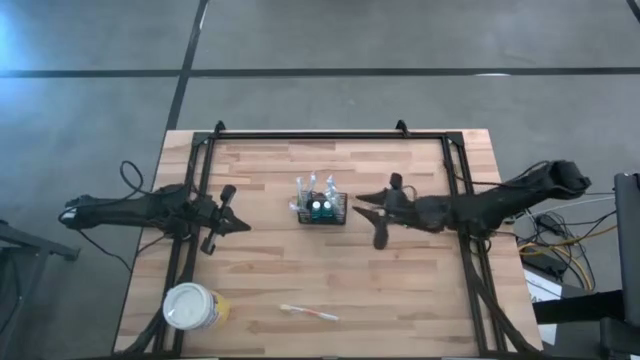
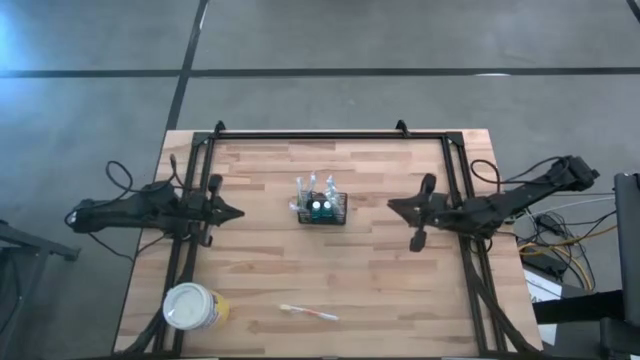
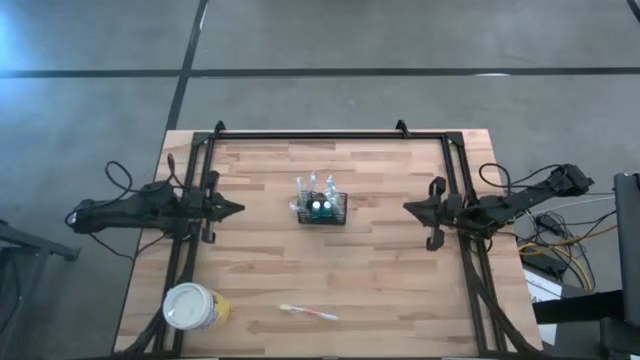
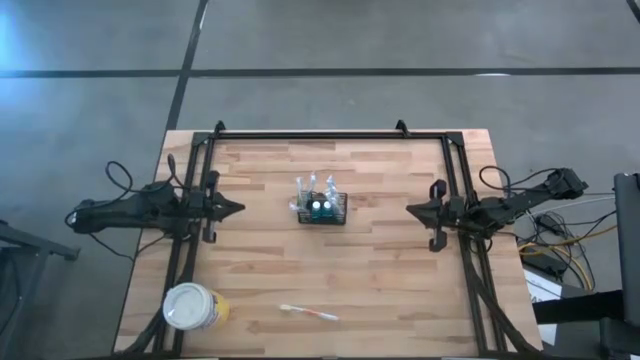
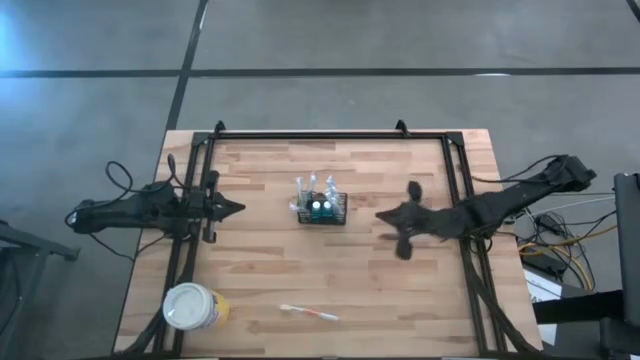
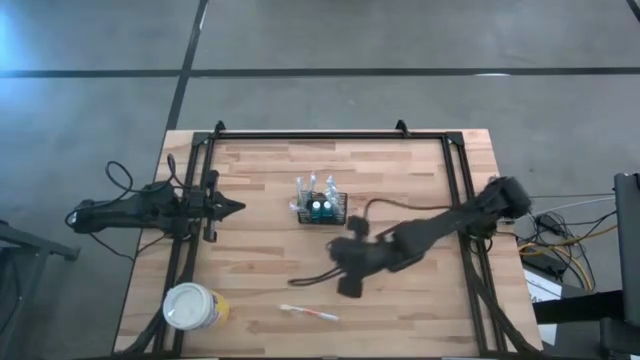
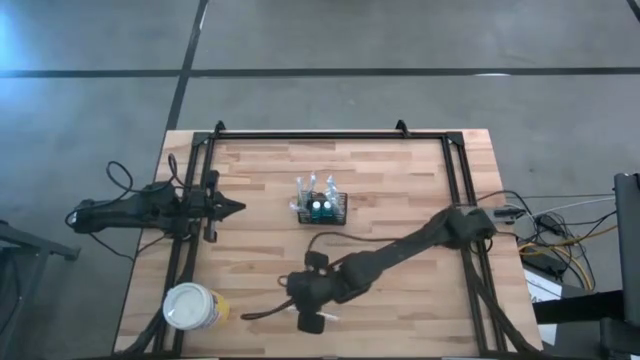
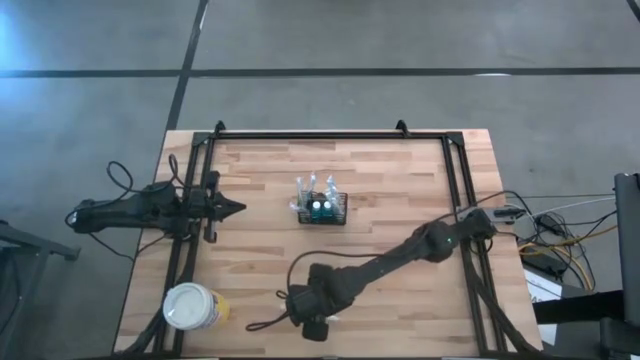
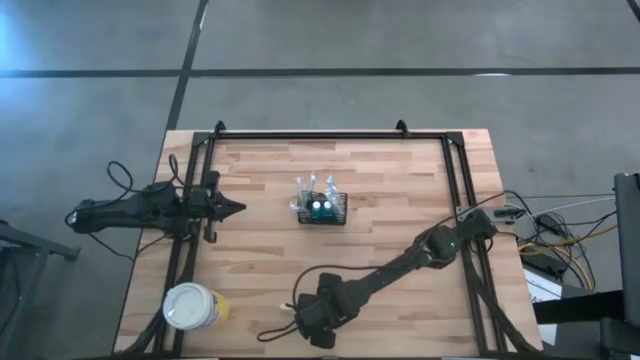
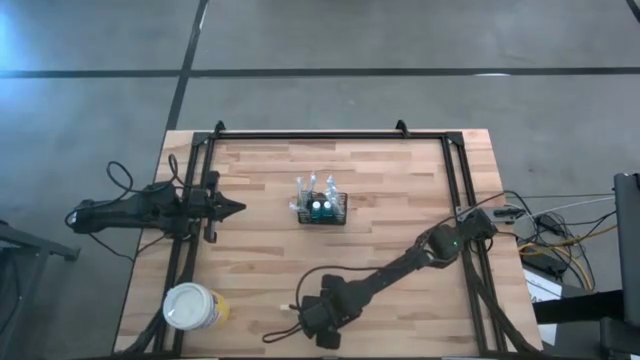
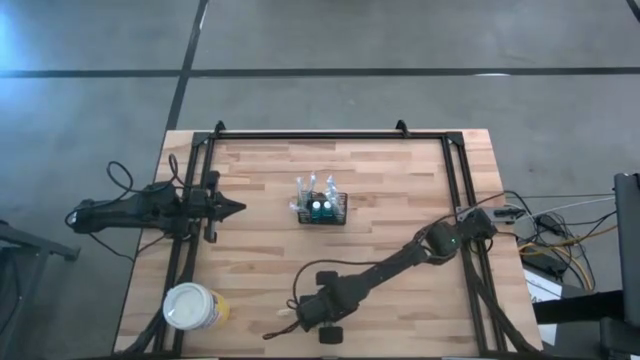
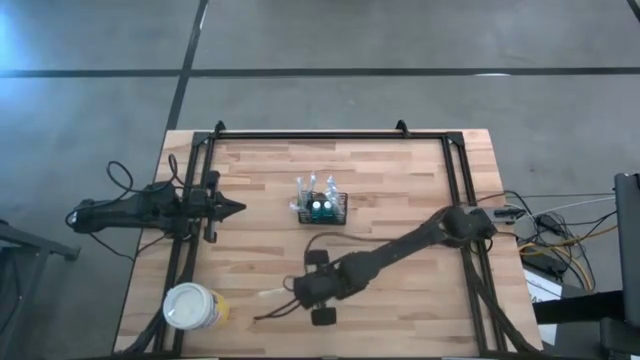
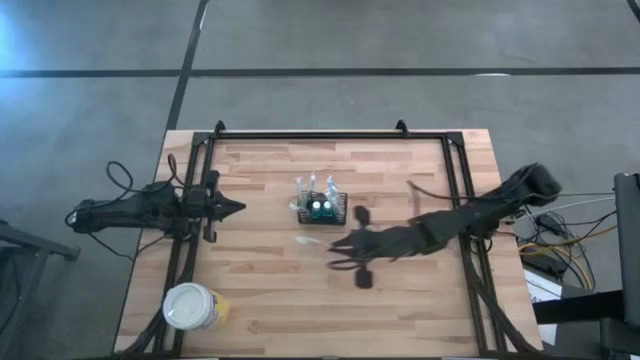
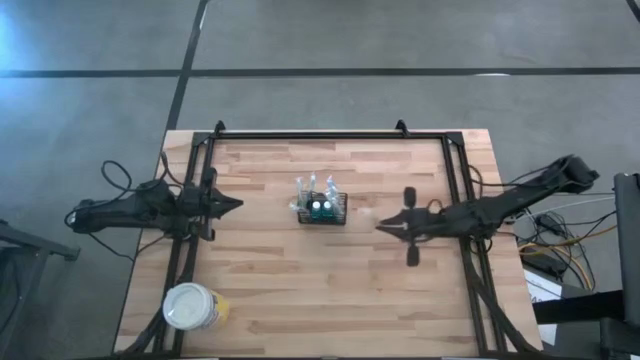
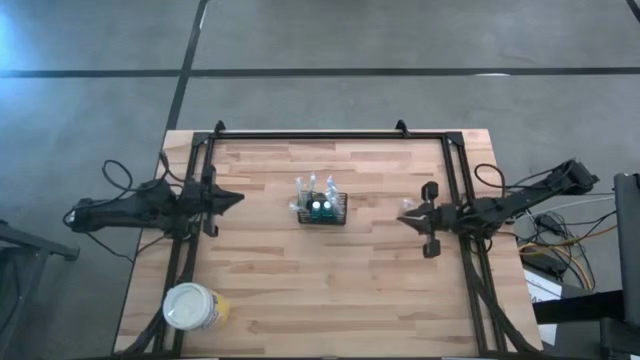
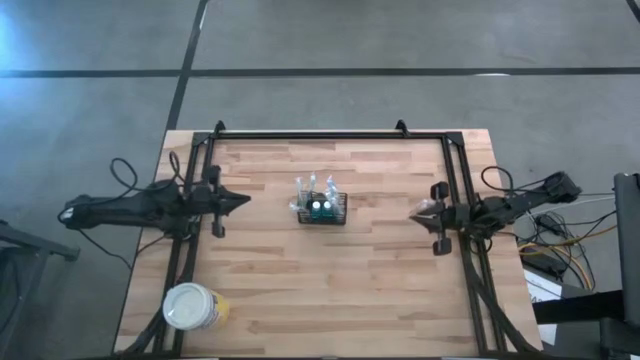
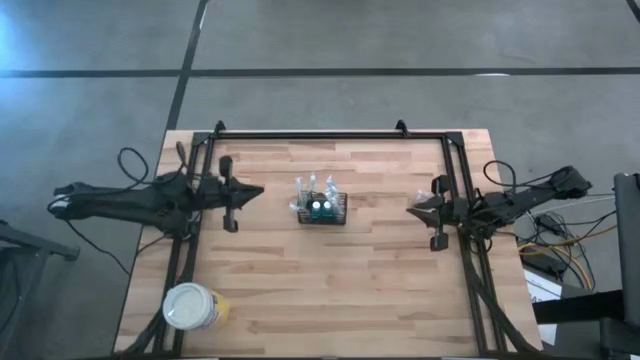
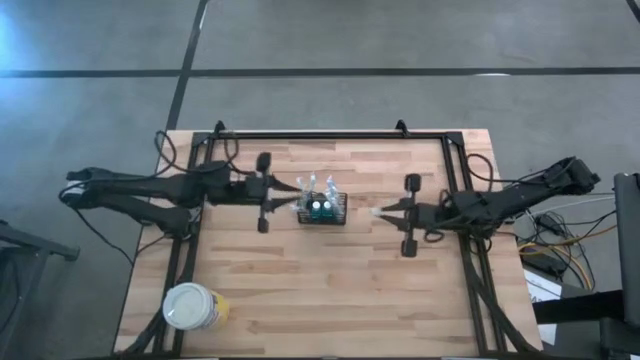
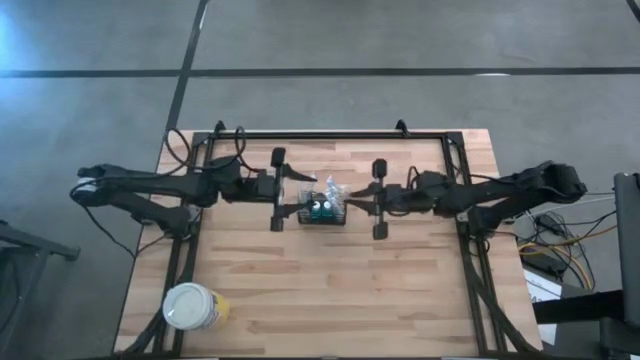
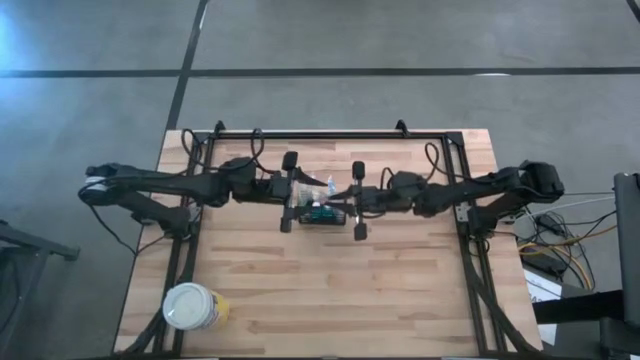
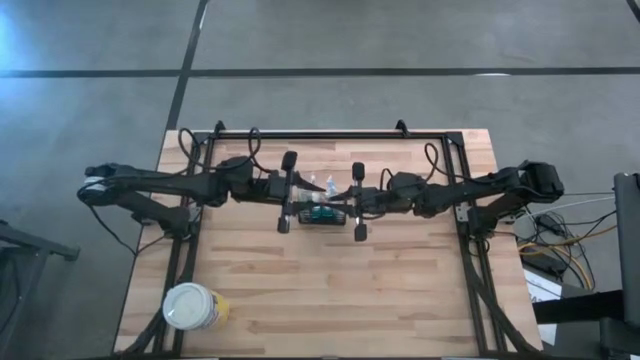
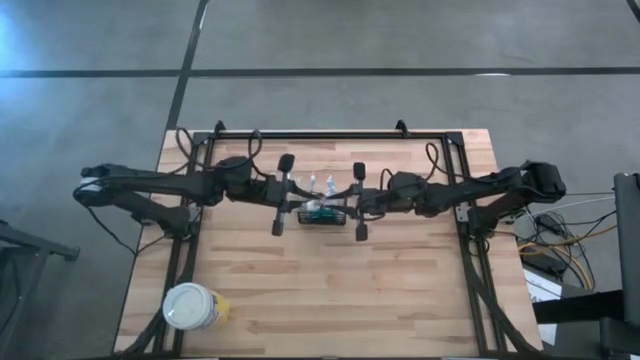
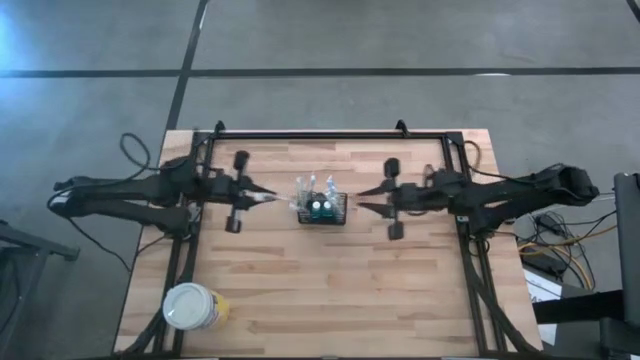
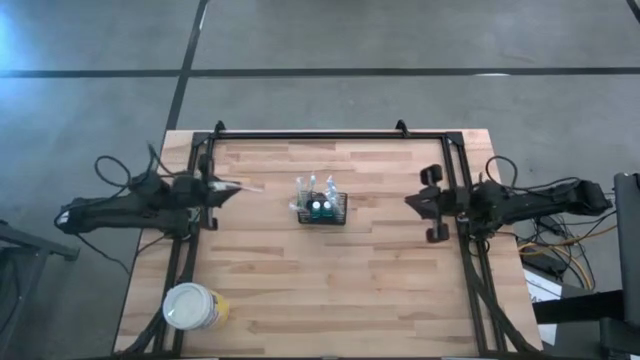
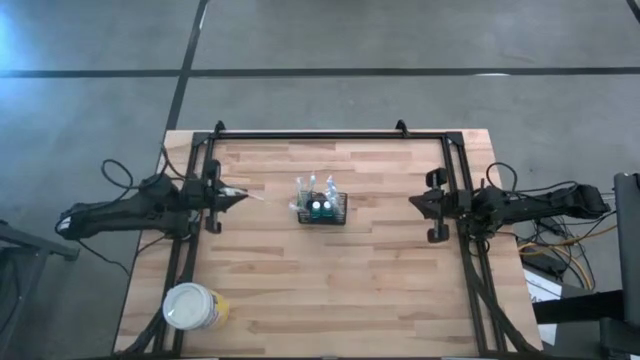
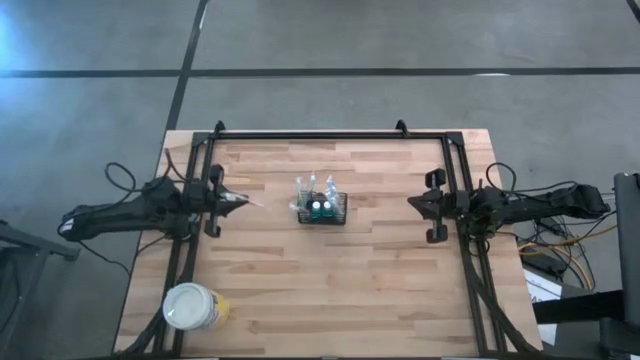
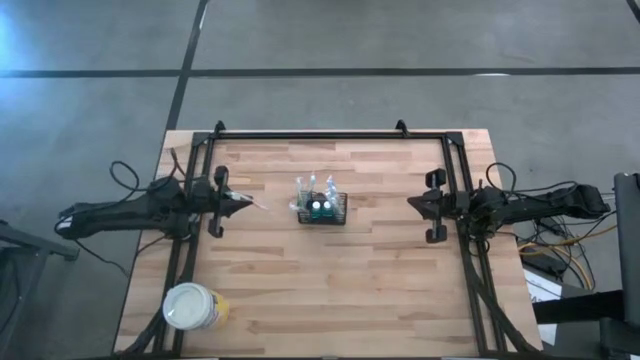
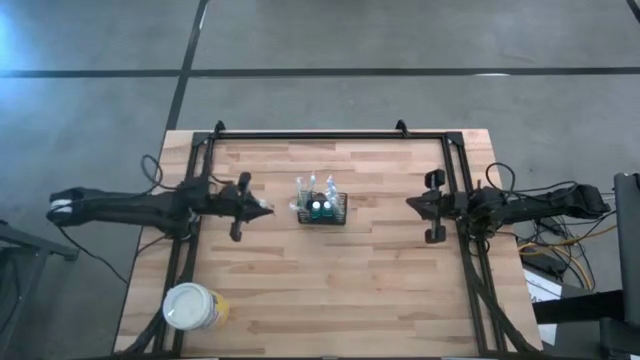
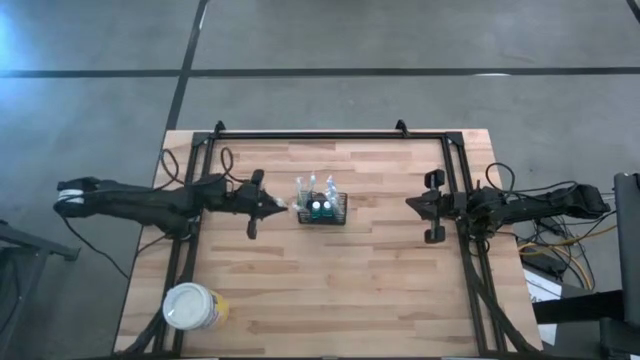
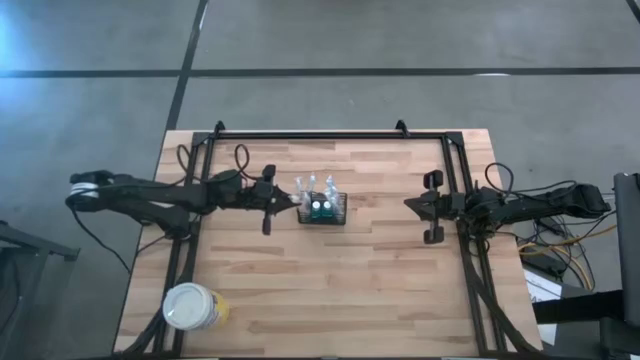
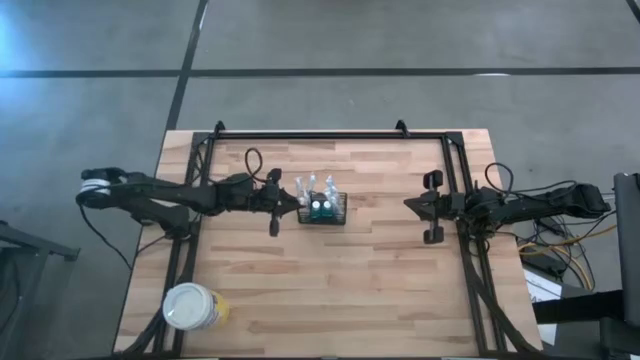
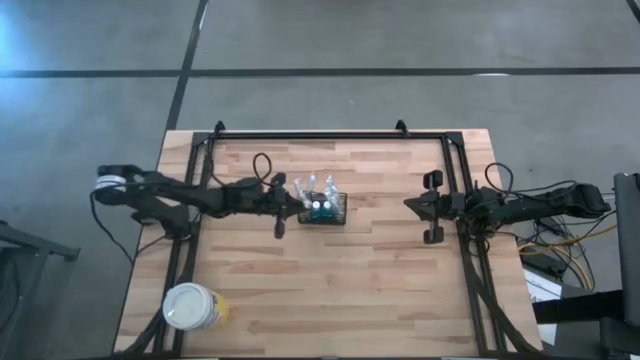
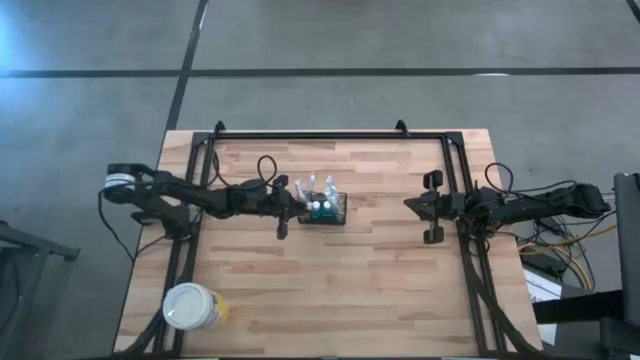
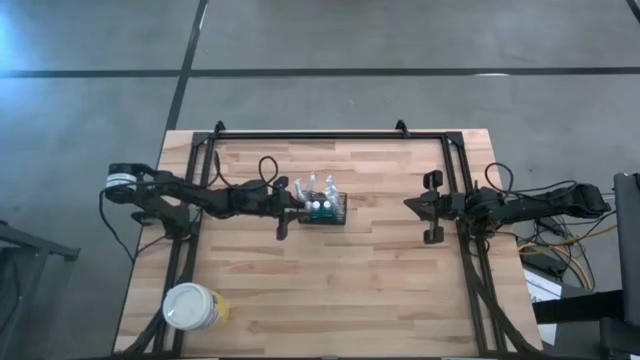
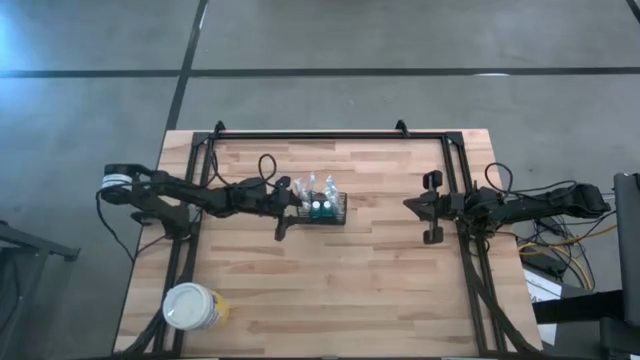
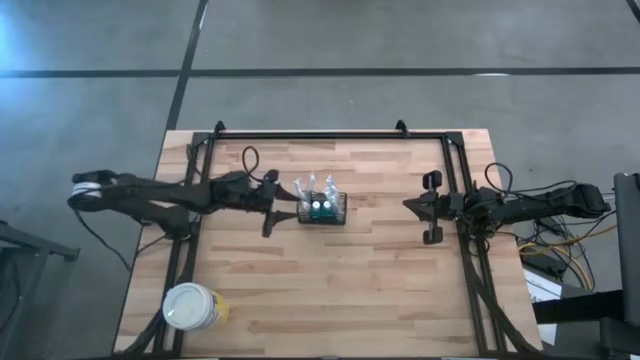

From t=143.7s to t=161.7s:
Task: Pick & Place toothbrushing station
Put the orange toothbrush into the wire organizer

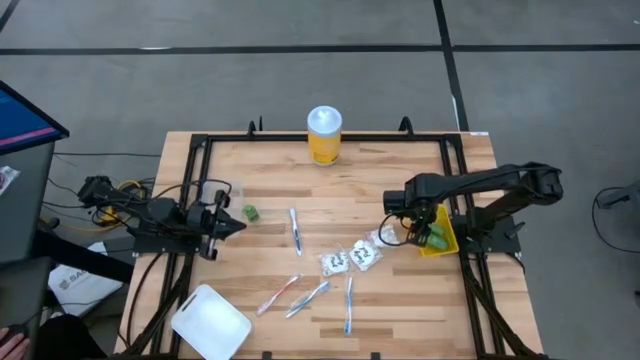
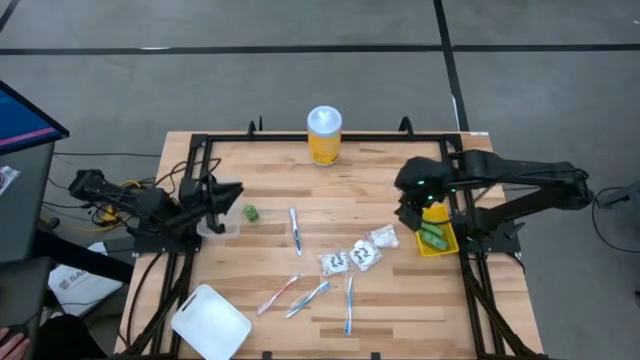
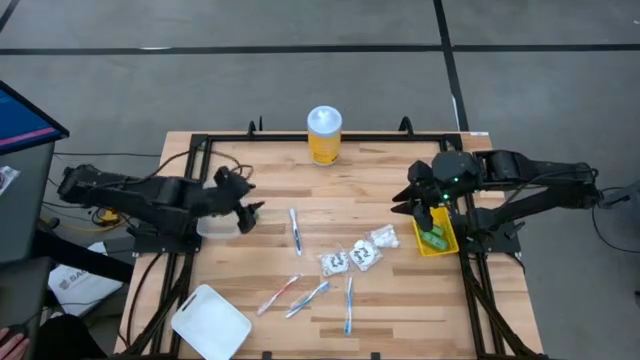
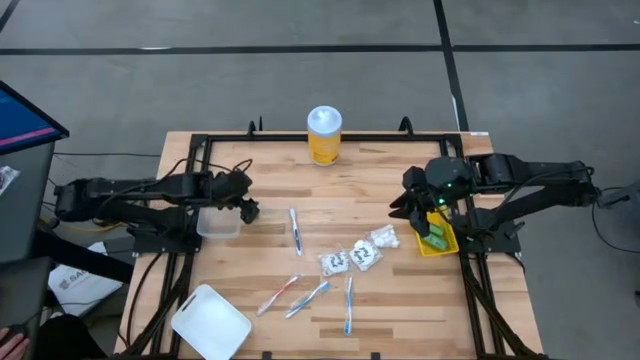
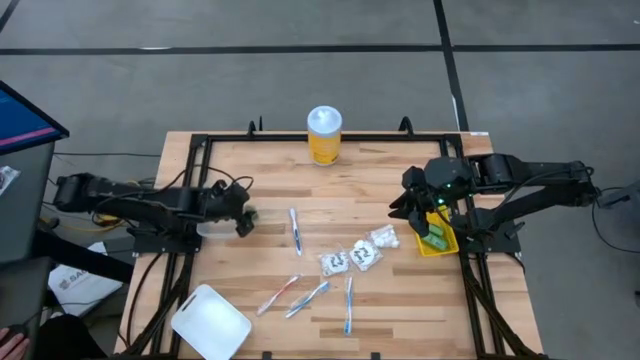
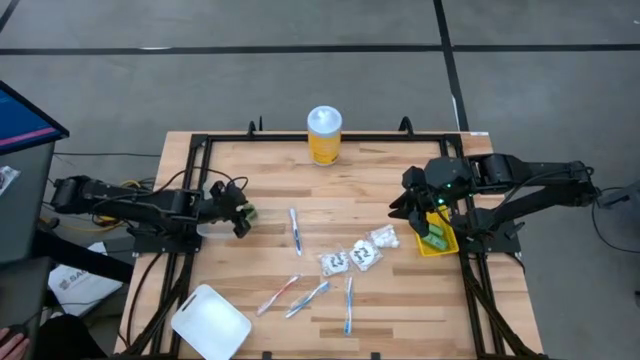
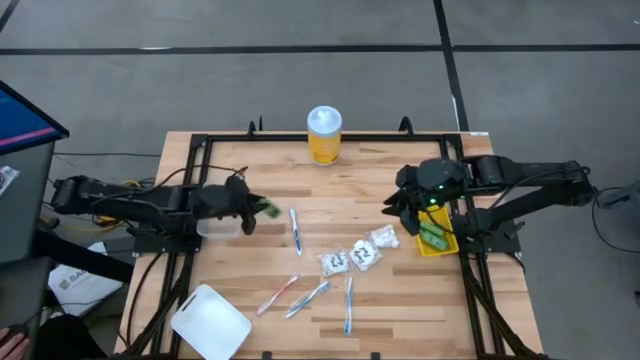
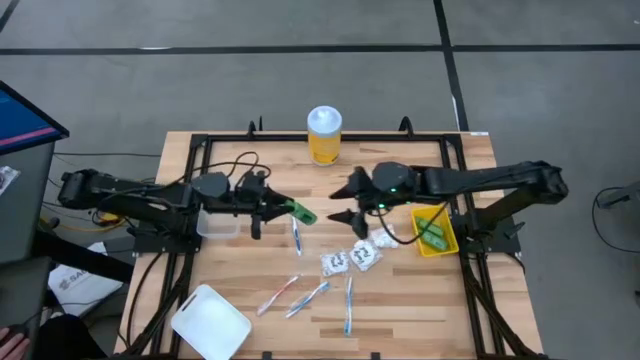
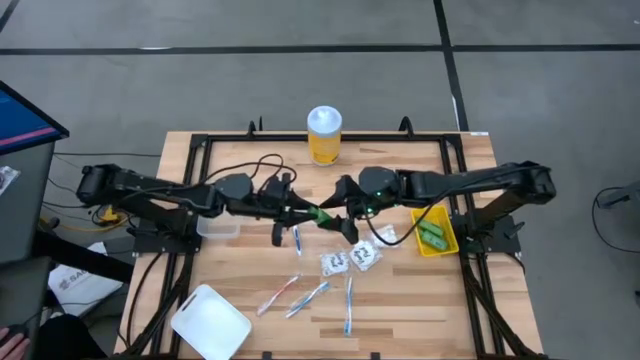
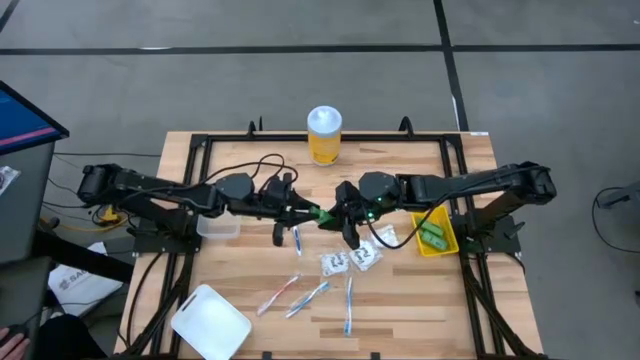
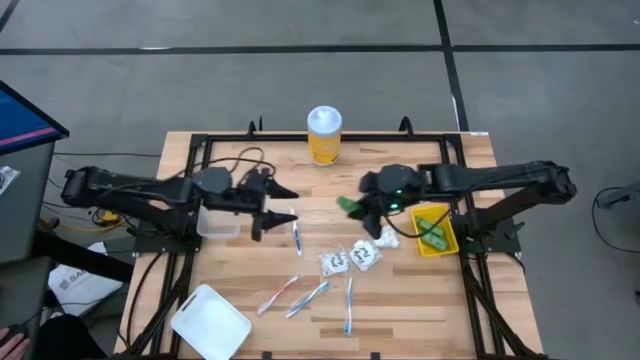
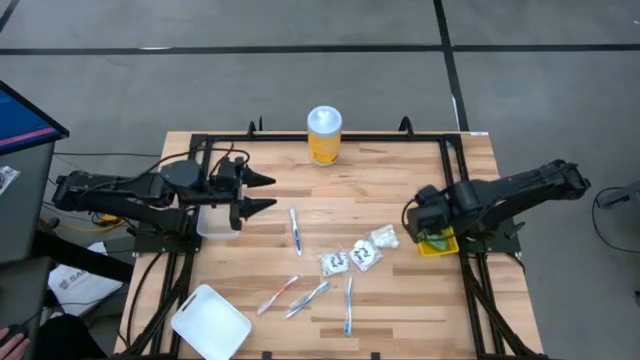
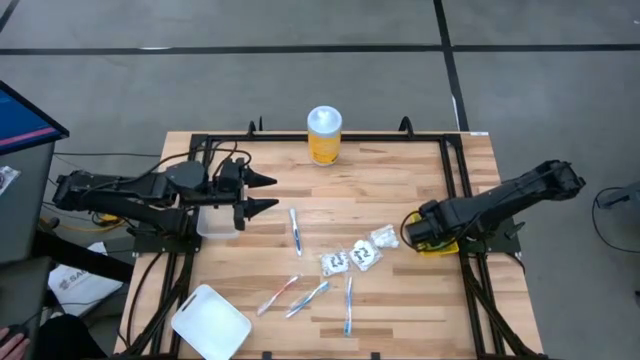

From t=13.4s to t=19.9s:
Task: Pick & Place Travel size toiletries
Put the green shampoo into the yellow bin
